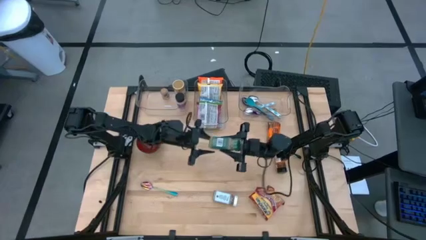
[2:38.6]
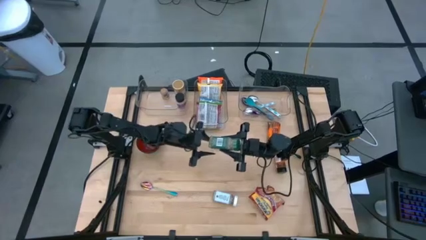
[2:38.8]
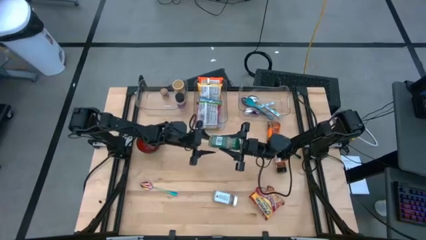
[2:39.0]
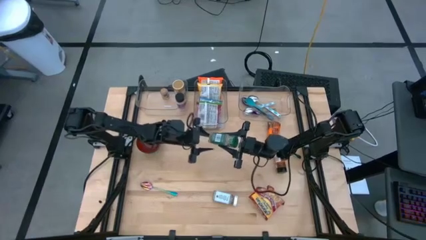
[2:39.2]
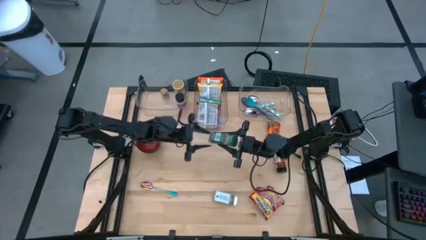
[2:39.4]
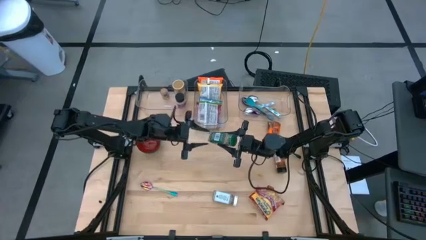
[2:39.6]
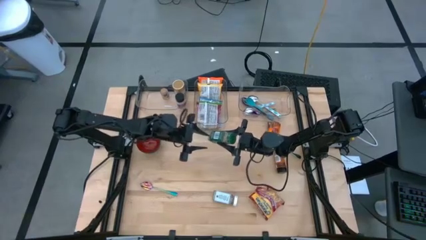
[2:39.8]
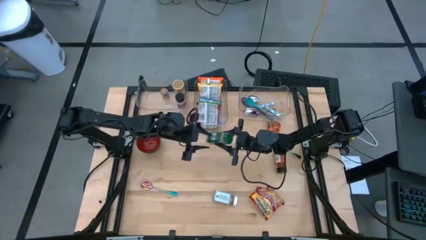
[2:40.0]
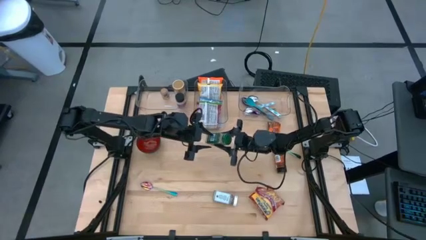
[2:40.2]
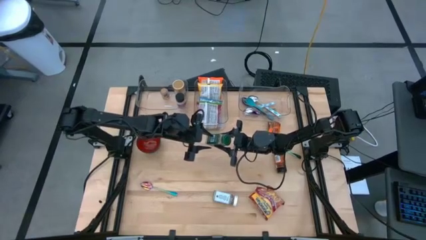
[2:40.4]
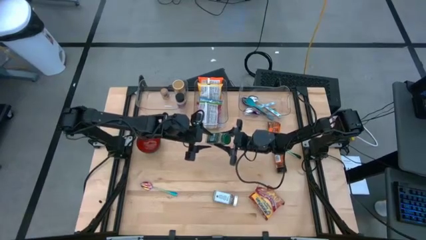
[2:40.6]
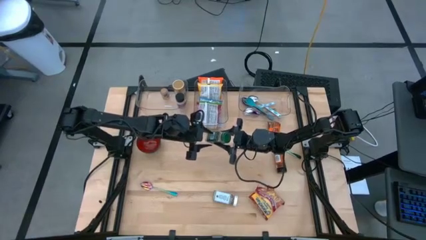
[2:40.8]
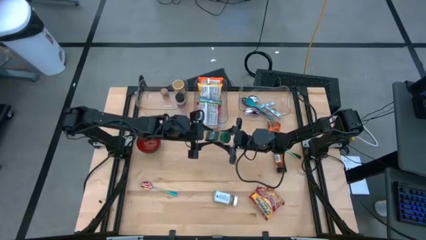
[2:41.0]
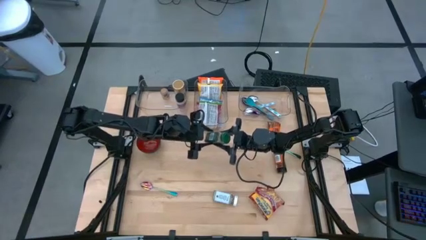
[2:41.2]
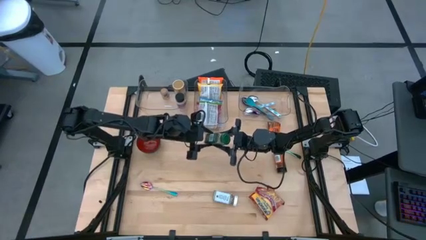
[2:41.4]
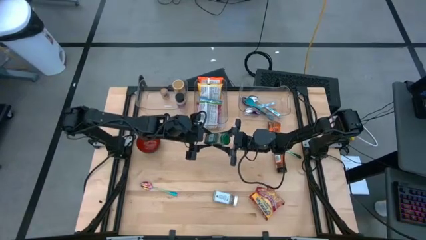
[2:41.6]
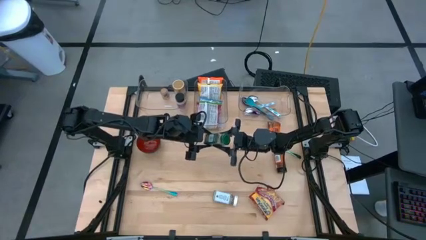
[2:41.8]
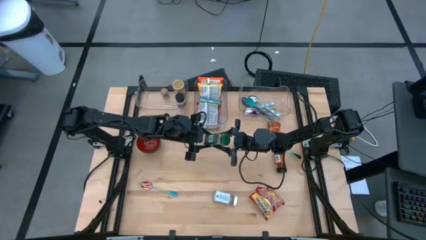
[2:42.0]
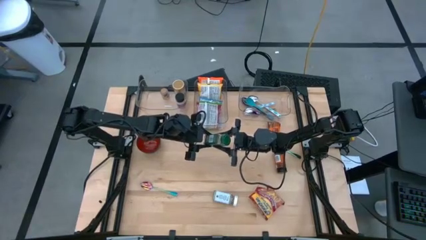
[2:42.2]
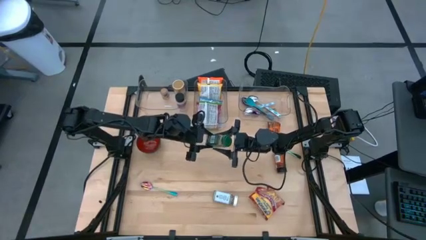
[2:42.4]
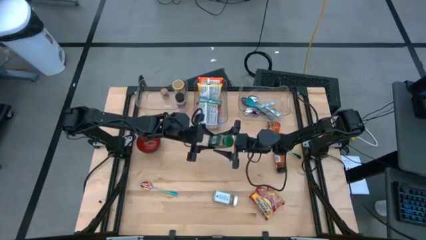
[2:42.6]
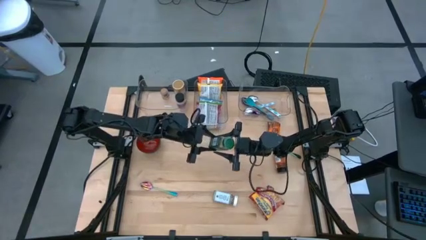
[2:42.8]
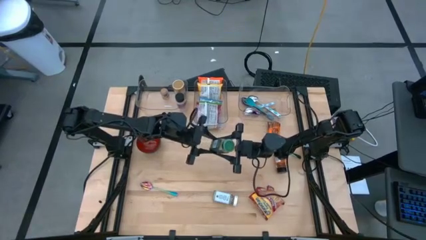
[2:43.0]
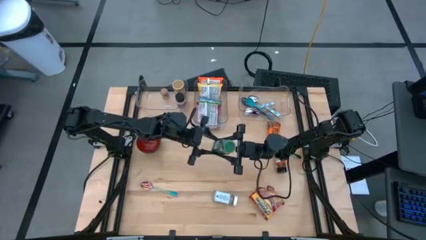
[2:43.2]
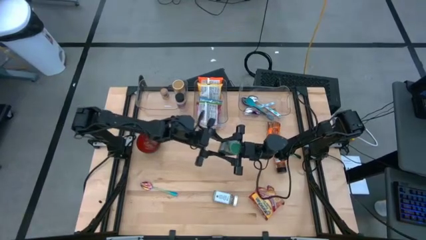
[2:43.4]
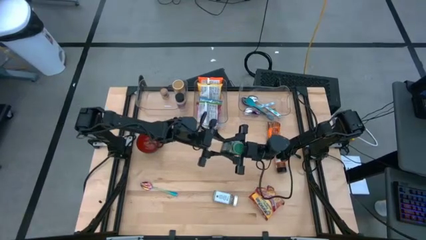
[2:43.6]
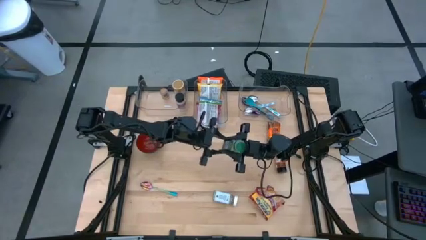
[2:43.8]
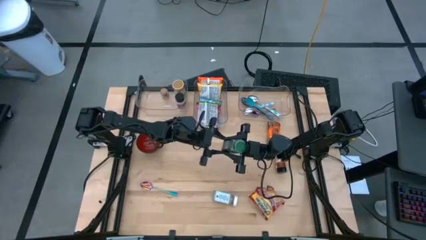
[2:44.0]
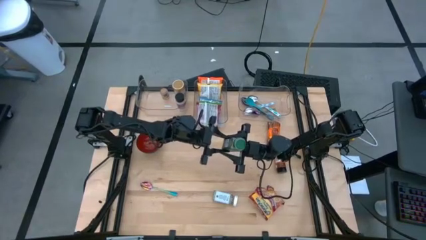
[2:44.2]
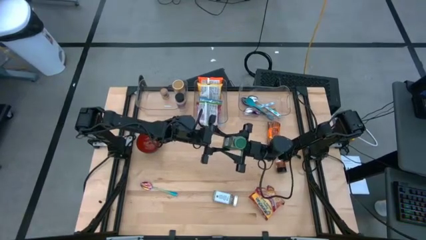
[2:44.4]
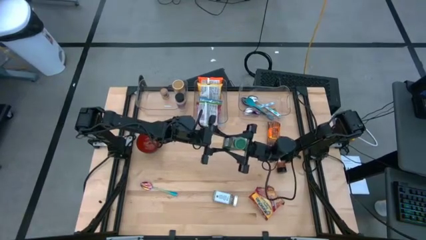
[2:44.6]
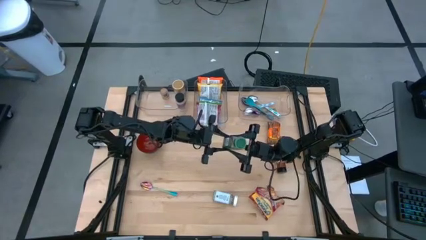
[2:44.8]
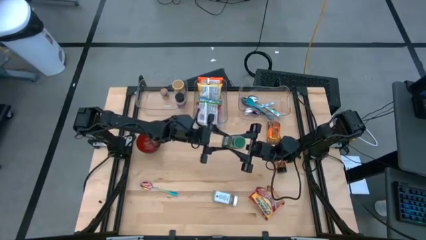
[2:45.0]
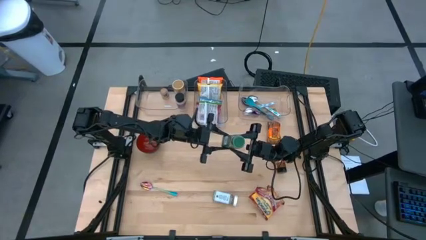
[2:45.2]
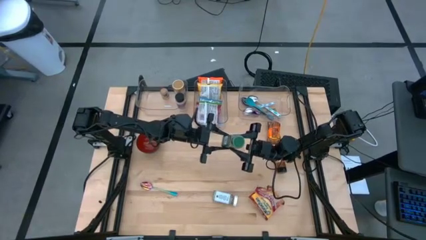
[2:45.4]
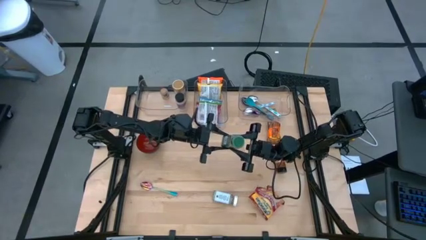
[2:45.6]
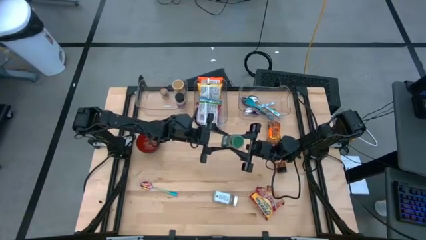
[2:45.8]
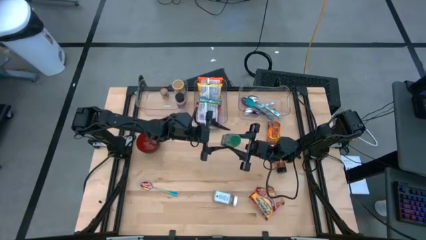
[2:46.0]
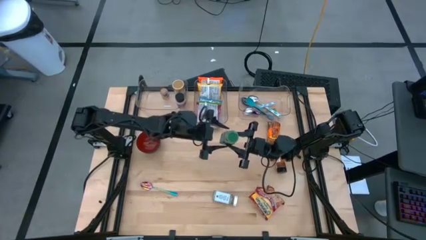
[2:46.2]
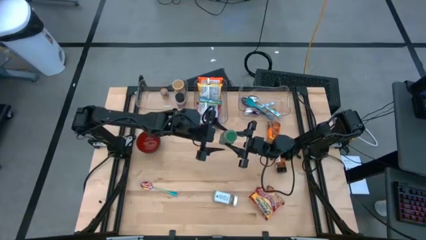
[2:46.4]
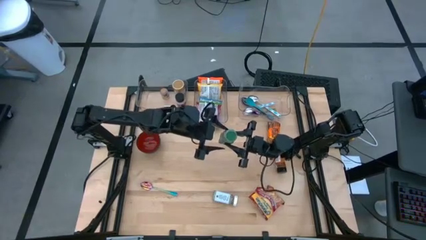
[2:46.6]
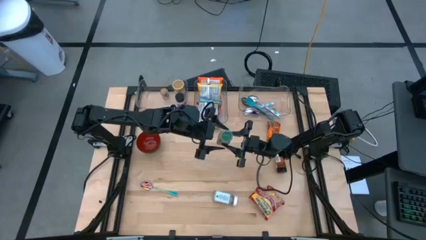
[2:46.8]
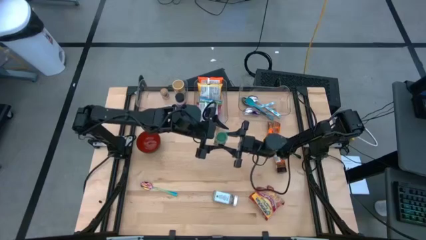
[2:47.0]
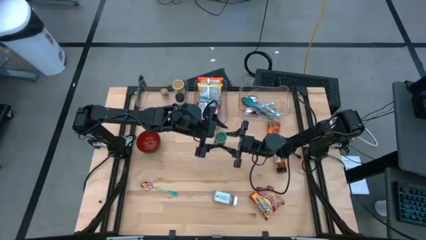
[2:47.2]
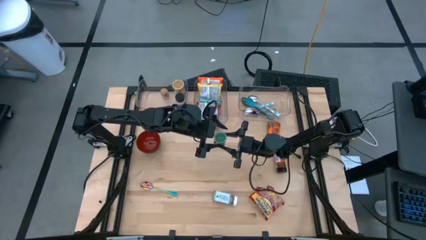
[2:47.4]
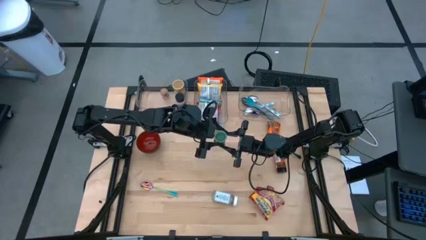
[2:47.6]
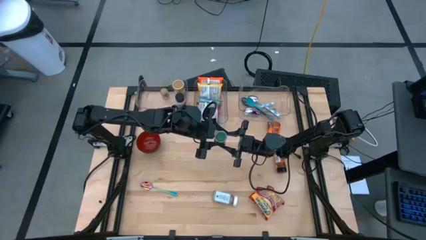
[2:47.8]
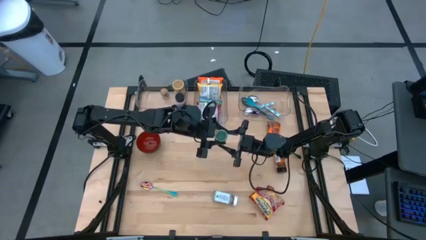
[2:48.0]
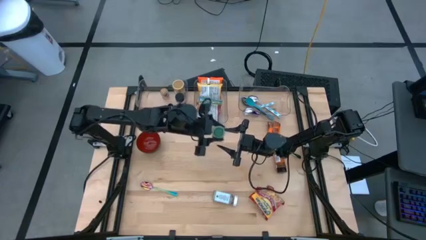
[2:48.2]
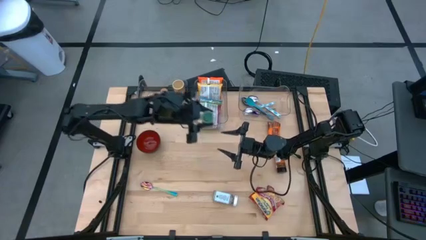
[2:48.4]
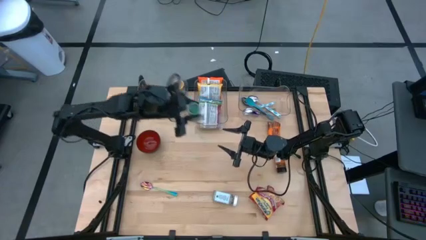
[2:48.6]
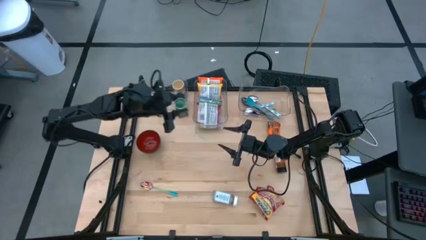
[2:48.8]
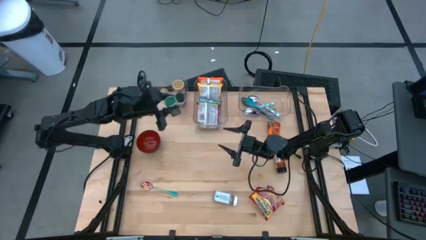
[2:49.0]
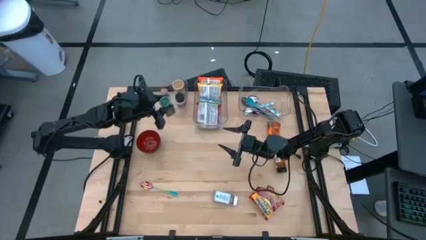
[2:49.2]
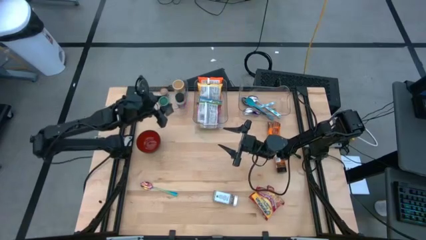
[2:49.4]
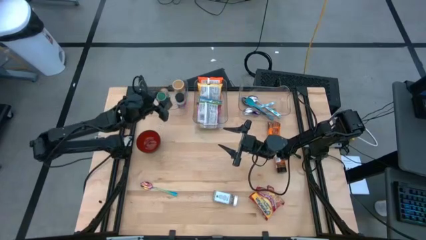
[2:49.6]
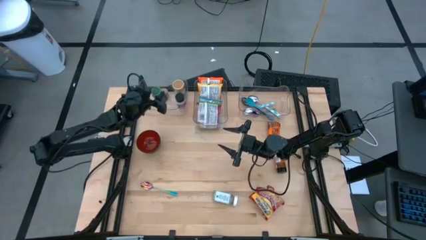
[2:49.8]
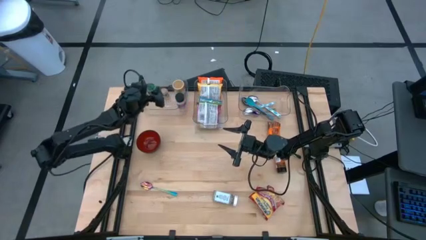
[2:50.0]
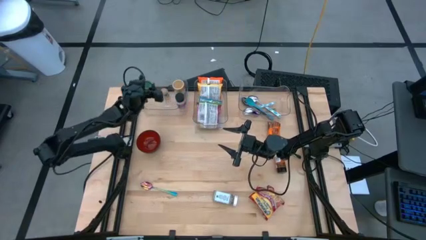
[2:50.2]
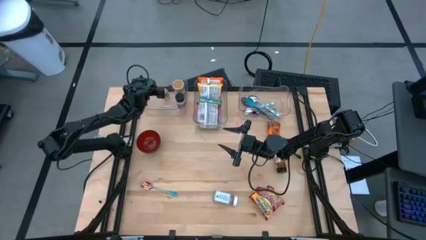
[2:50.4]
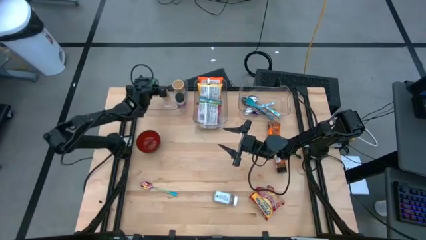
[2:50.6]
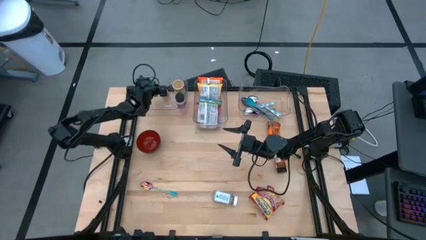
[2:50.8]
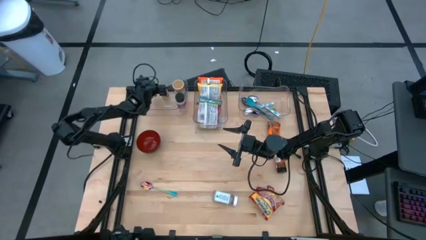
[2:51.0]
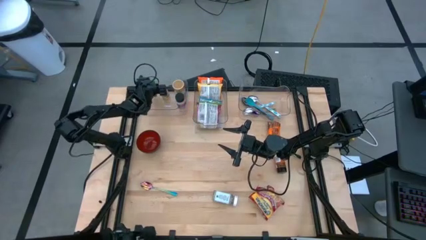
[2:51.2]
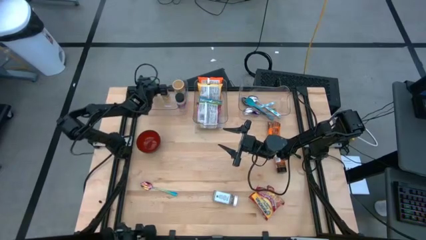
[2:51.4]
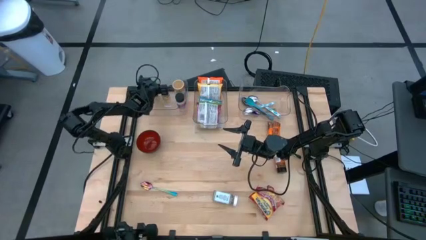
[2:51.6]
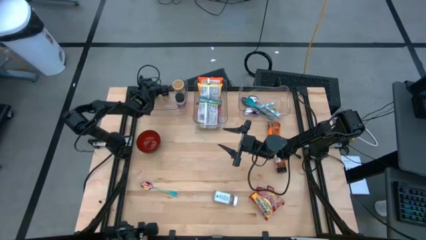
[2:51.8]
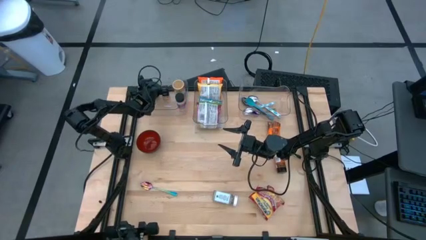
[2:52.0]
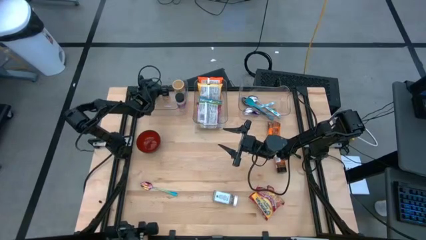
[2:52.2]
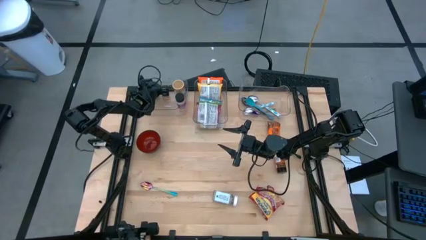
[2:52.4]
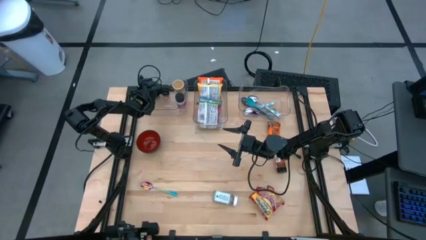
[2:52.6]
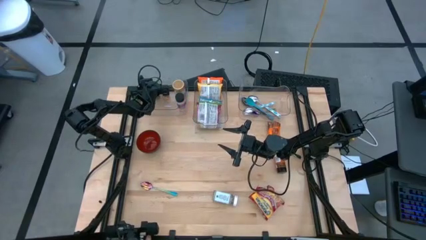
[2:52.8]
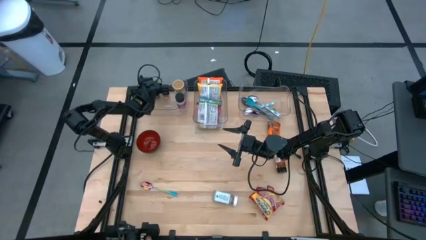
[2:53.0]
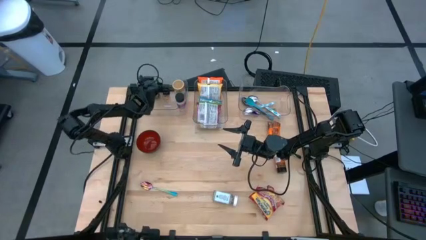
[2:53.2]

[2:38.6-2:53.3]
Task: Pick & Place Food Item
Put the green seasoning bottle into the left transparent bin

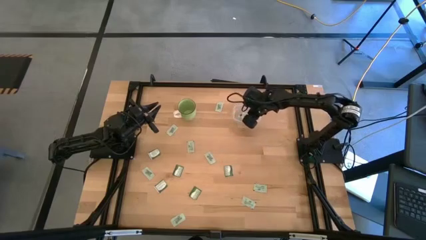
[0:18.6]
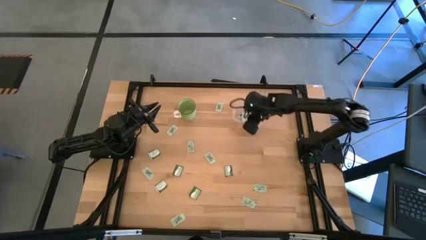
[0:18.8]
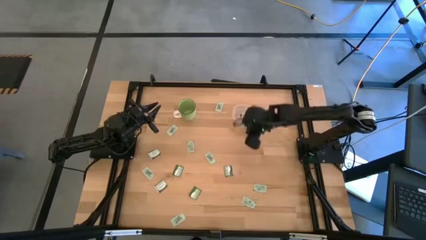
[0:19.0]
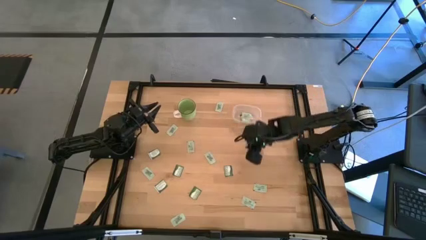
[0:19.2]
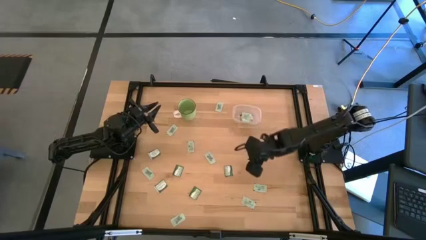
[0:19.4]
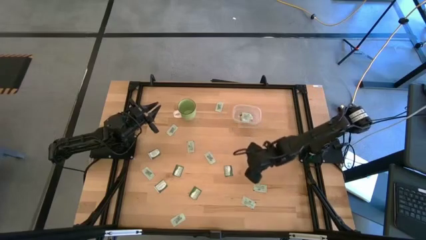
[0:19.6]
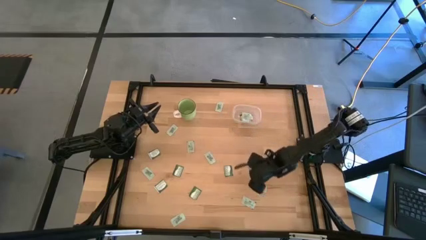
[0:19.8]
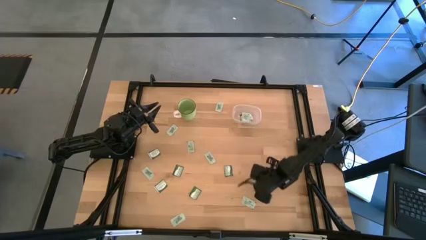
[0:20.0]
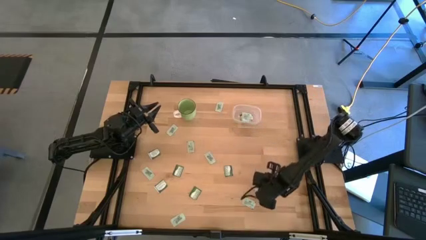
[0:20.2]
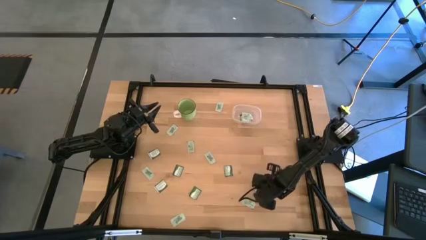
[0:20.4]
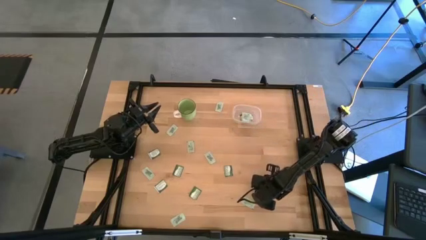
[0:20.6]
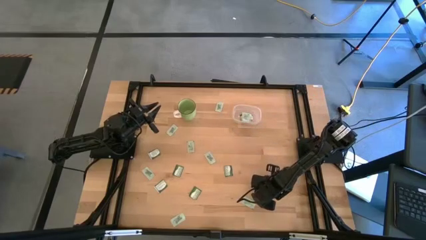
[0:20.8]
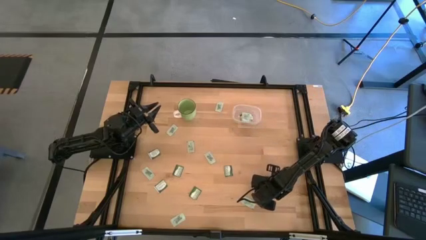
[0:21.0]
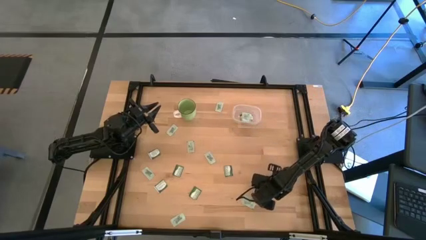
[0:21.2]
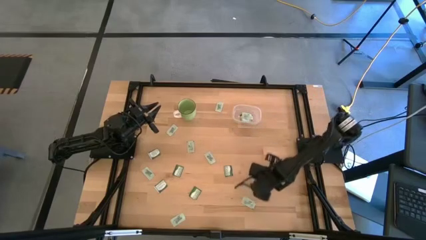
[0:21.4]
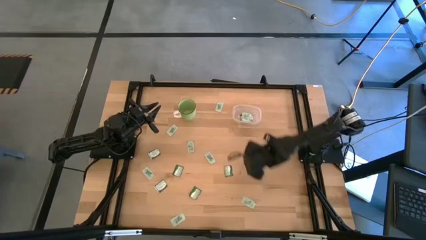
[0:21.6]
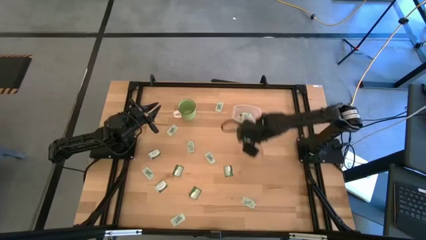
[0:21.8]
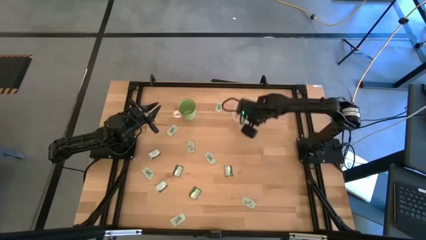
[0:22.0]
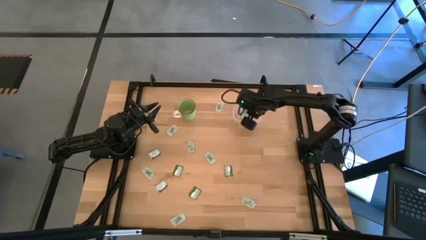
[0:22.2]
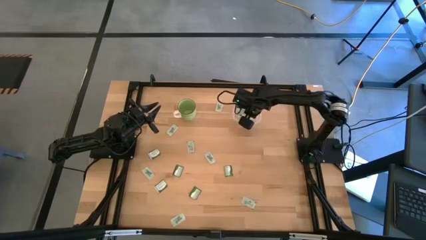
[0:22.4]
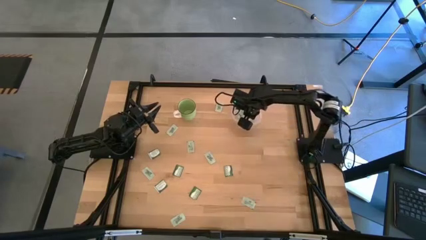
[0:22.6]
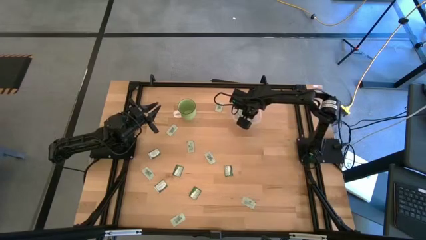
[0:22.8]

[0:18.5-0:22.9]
Task: Pick and place items into bin
Put the white stevia packet into the transparent bin
